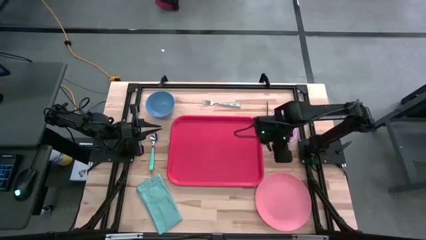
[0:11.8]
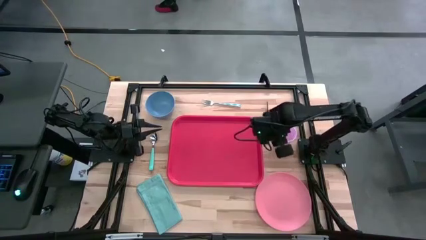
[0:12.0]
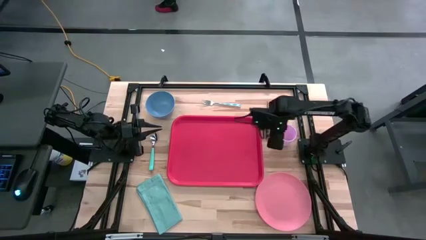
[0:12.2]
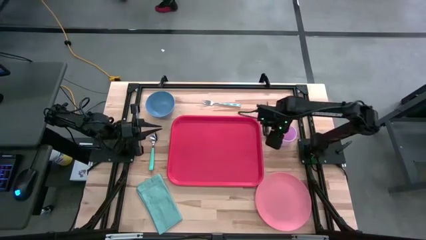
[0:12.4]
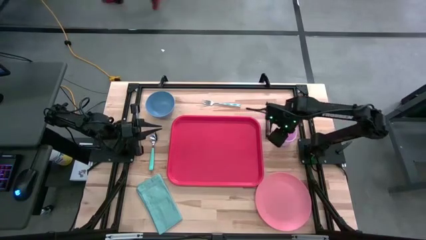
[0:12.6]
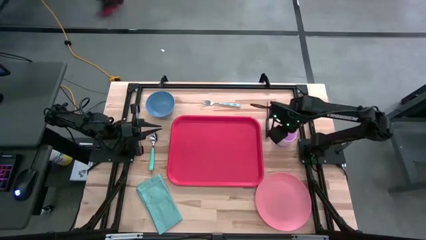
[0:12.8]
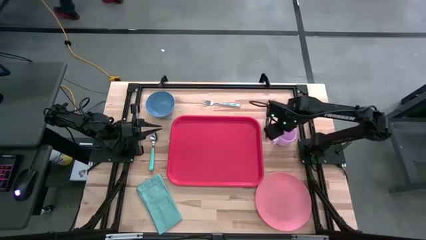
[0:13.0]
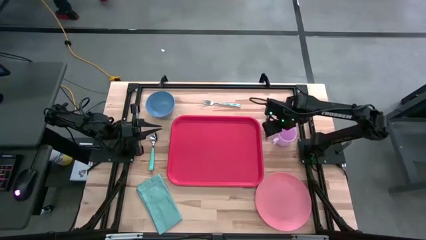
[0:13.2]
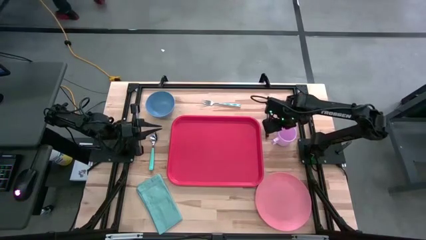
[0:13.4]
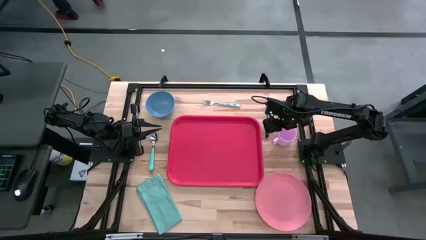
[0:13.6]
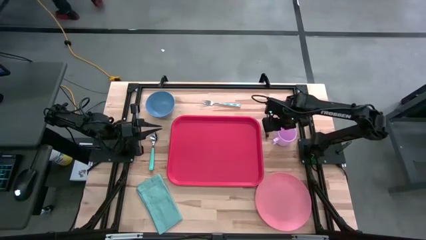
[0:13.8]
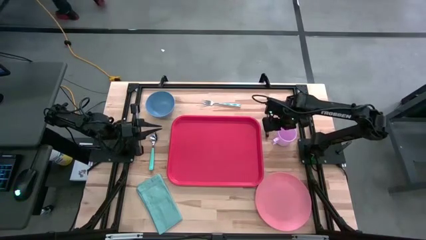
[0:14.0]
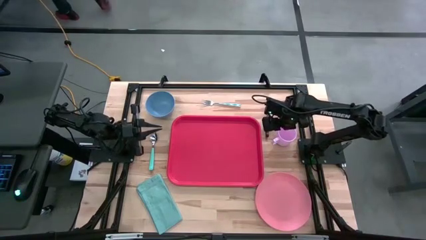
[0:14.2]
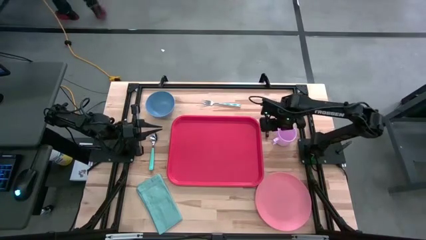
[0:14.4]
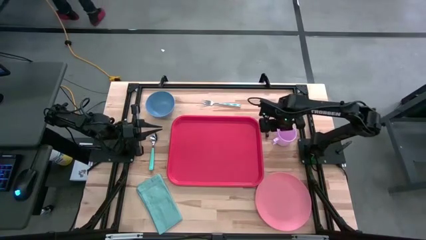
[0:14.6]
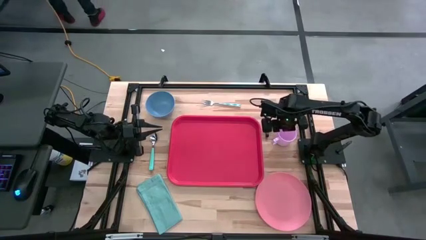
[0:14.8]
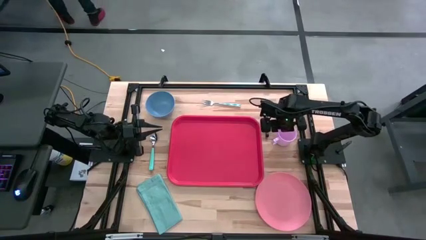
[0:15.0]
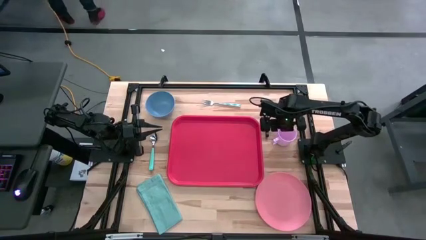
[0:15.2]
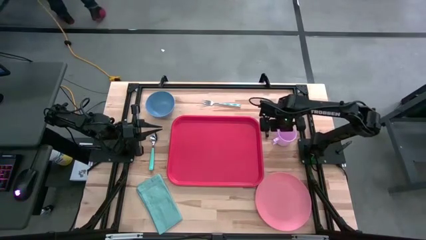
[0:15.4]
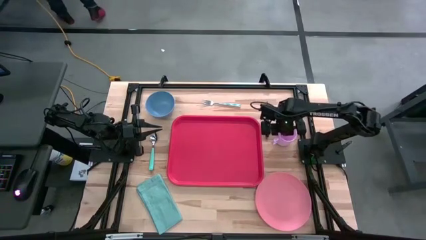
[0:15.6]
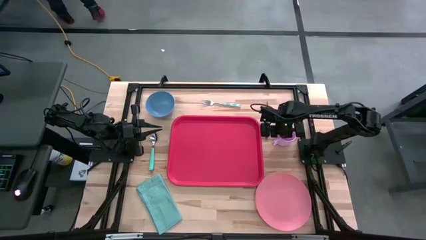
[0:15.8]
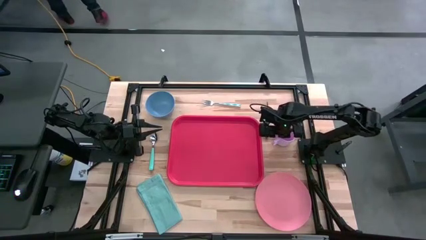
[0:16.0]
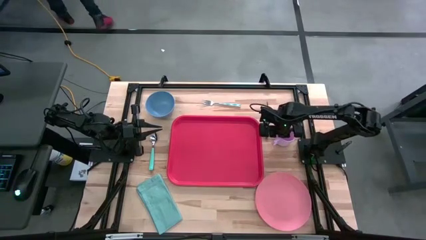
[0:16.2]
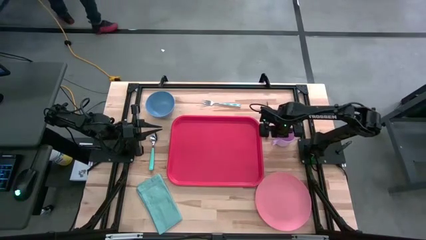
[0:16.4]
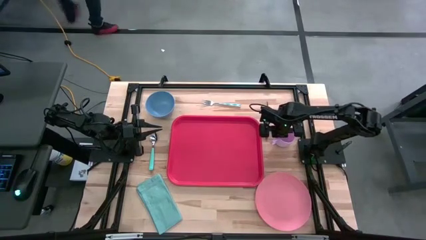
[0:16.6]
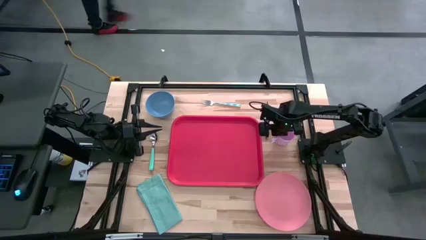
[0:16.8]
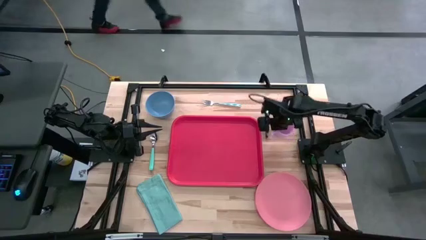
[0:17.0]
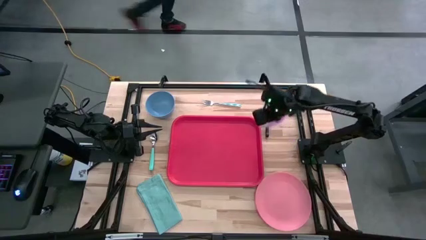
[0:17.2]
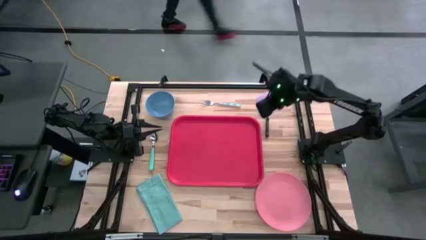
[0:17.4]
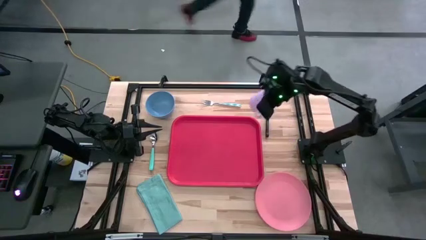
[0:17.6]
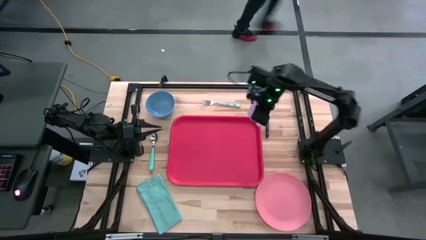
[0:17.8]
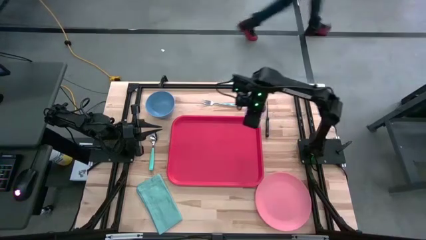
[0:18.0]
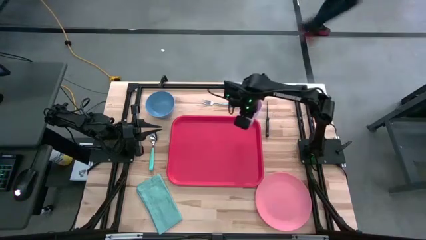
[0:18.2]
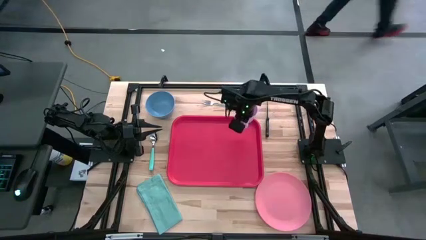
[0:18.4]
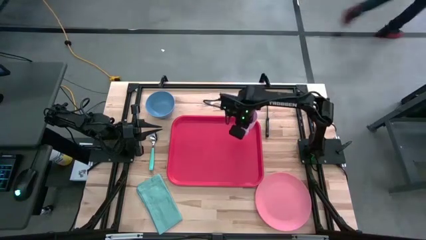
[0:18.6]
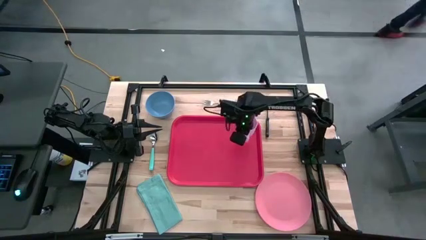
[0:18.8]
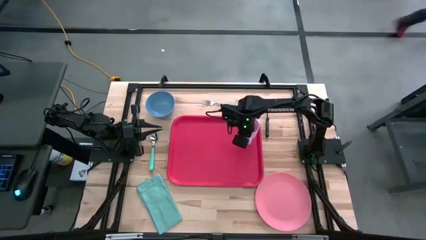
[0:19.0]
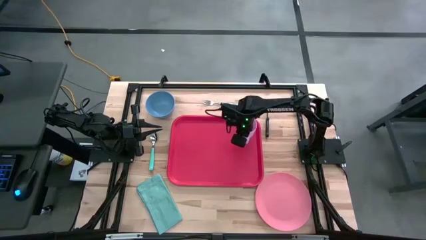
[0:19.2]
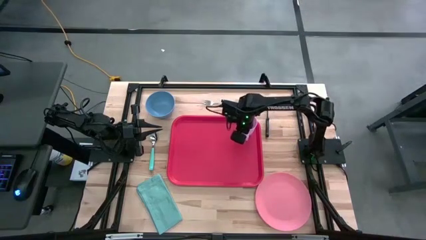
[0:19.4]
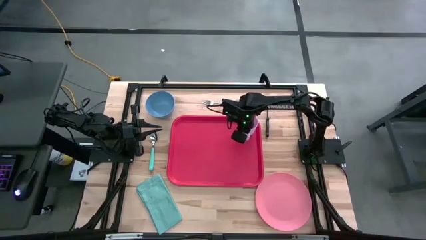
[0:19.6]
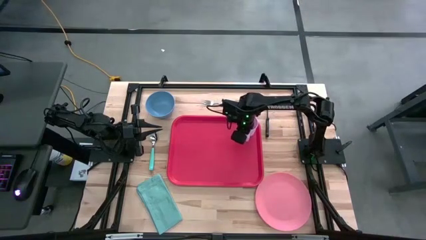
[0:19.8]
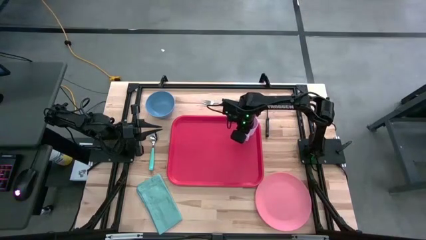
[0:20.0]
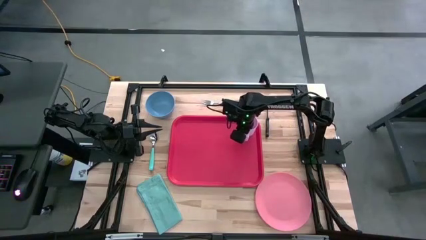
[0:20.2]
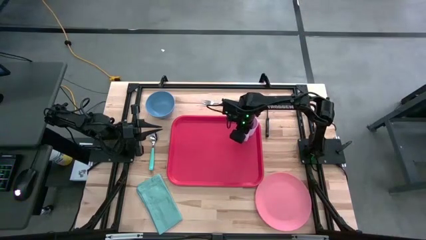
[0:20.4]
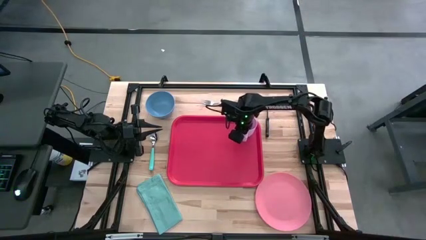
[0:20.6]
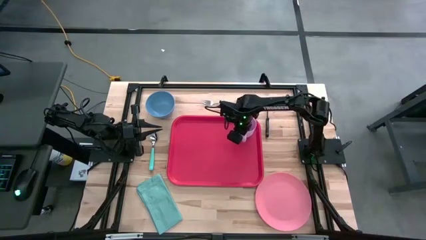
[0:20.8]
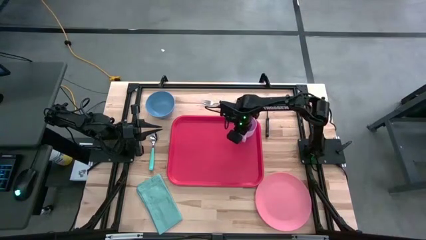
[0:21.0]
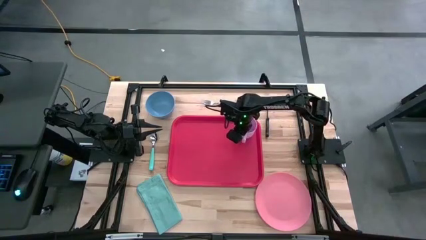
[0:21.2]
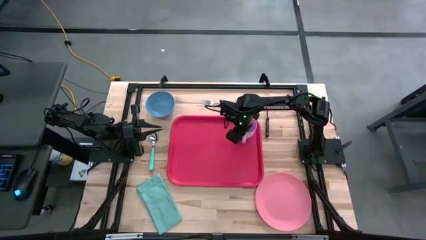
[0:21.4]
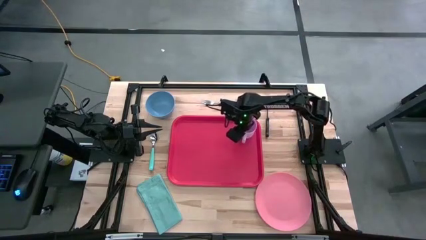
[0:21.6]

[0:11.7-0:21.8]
Task: Set up tray
Put the purple cup on the red tray

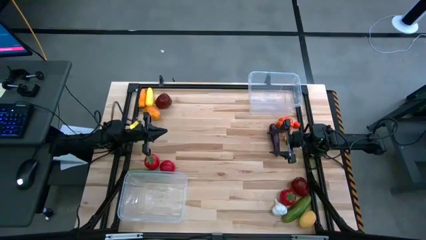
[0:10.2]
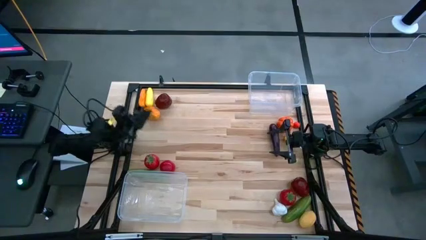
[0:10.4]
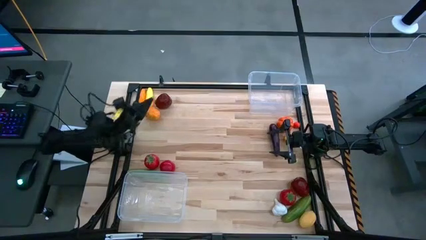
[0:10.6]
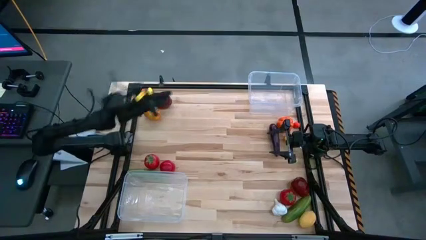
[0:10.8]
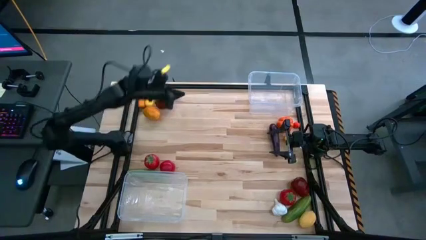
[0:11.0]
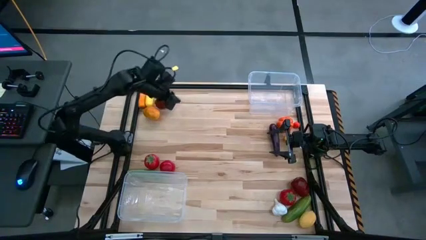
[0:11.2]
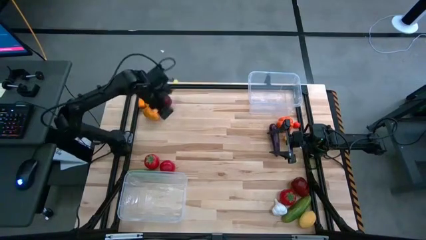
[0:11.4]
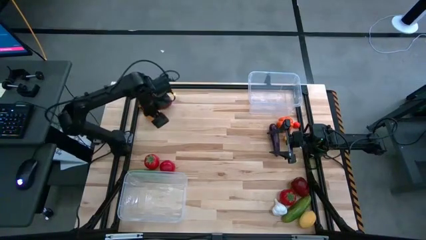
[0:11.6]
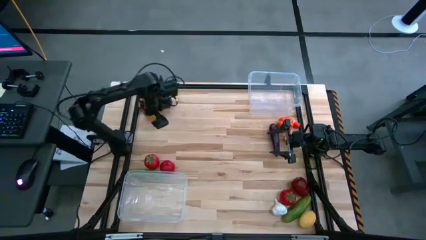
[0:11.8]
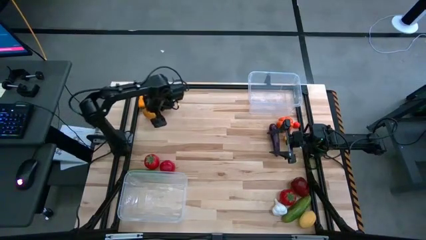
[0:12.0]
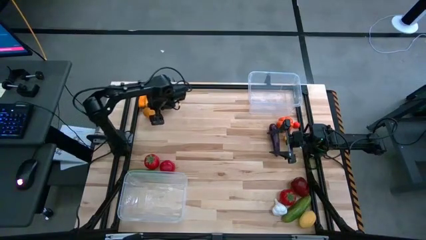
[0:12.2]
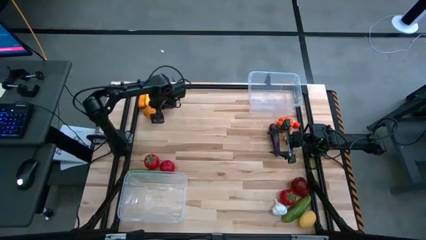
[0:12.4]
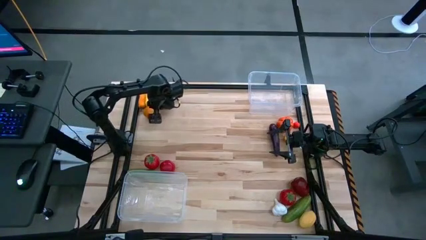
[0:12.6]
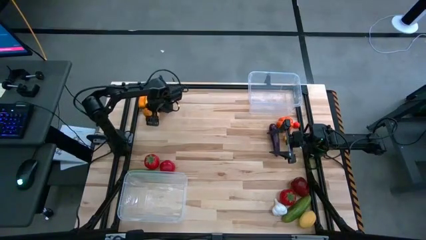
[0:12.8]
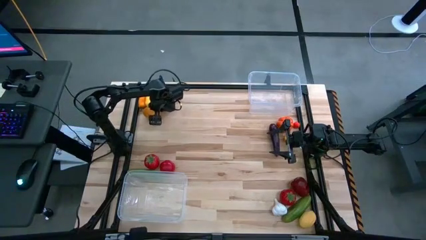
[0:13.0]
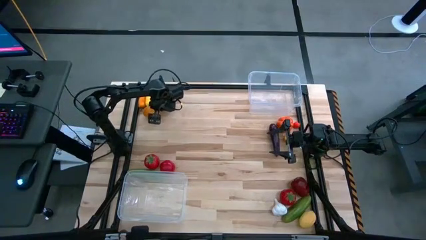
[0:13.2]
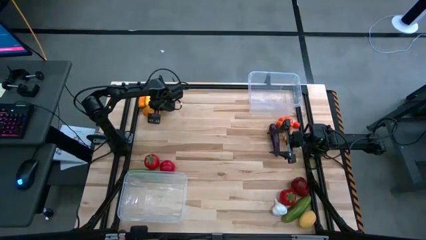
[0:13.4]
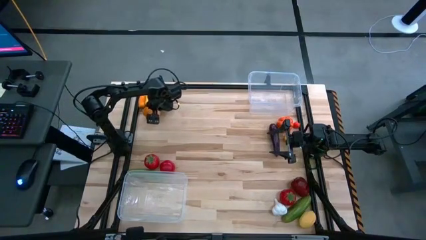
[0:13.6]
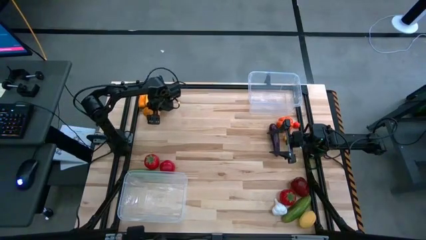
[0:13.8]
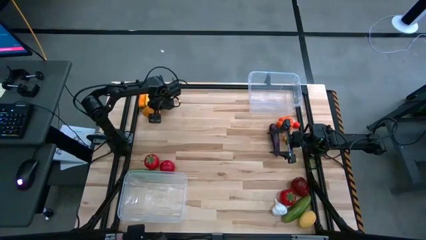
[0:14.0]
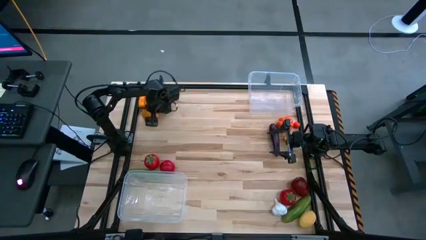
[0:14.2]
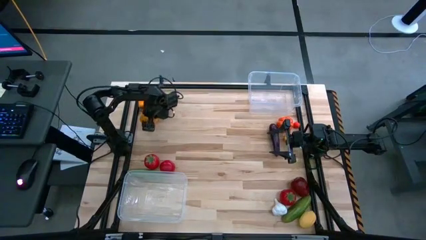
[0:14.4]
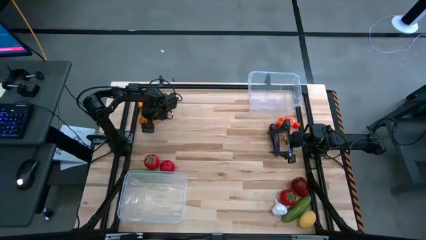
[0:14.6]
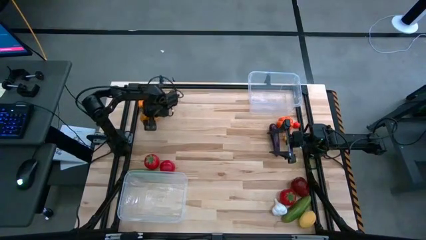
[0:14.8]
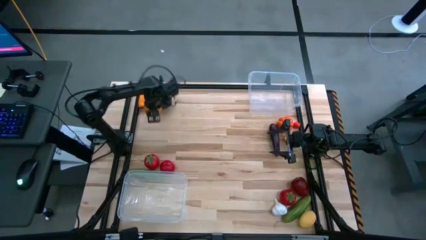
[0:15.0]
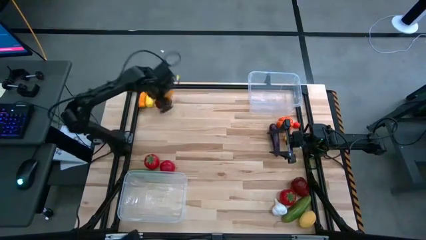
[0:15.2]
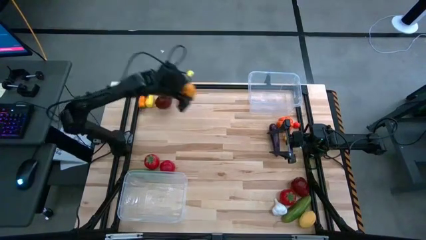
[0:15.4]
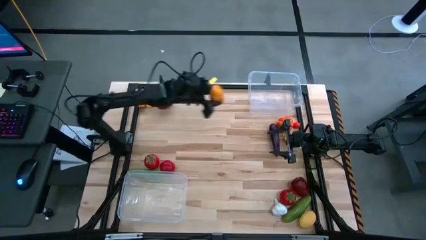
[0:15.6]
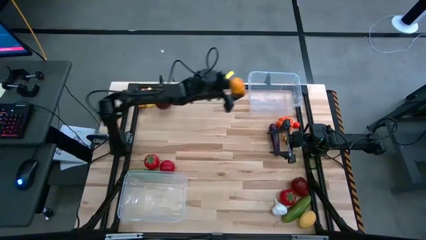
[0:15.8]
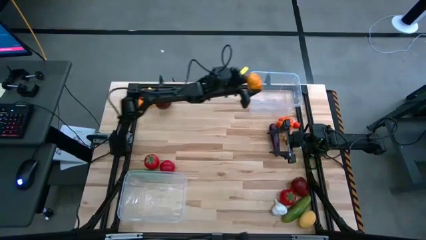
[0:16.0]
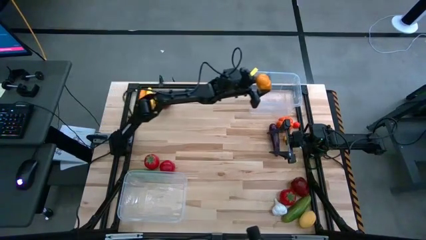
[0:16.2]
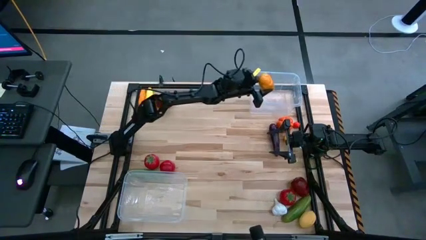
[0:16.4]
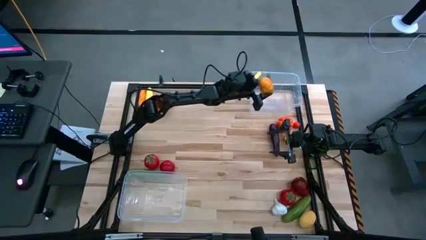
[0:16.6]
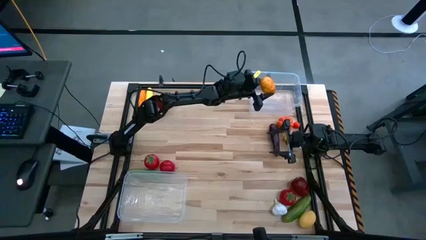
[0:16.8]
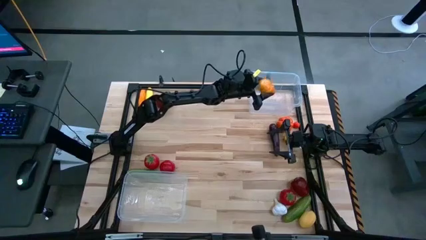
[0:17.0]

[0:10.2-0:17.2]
Task: Sort produce into baskets
Put the brown potato into the top transparent bin
